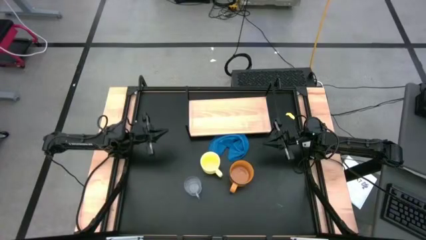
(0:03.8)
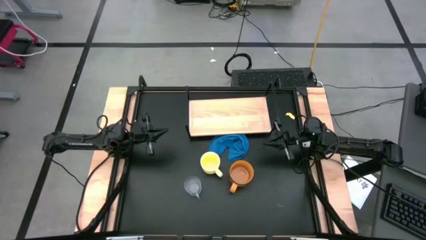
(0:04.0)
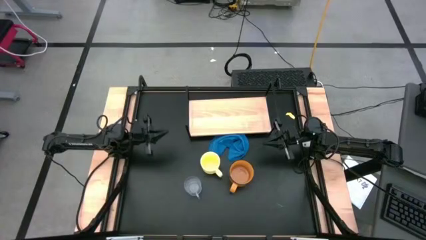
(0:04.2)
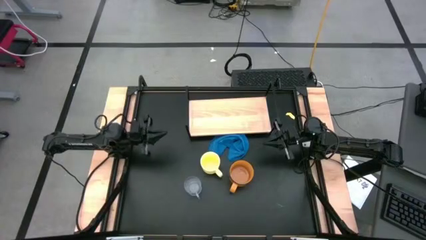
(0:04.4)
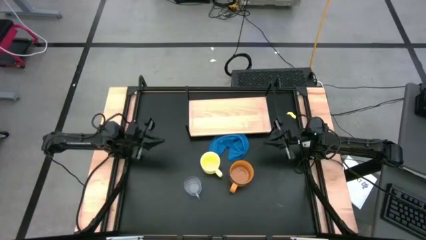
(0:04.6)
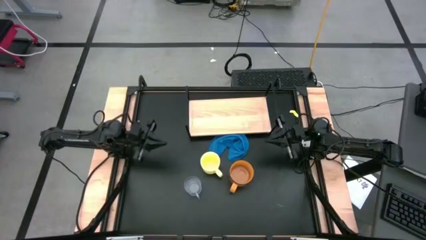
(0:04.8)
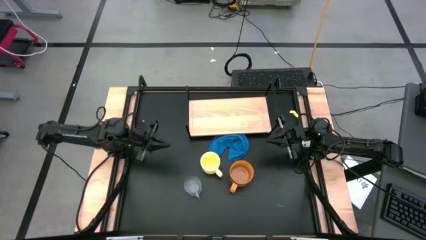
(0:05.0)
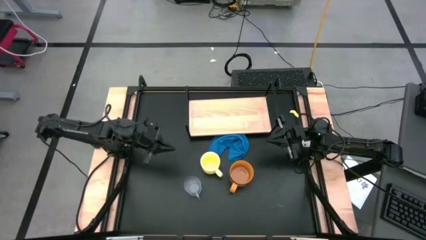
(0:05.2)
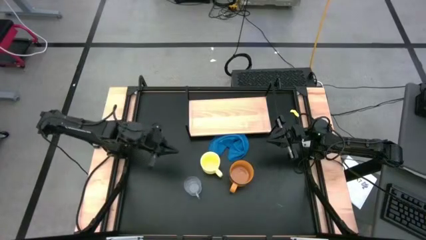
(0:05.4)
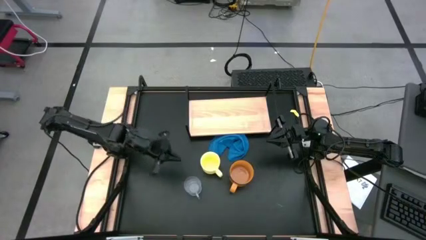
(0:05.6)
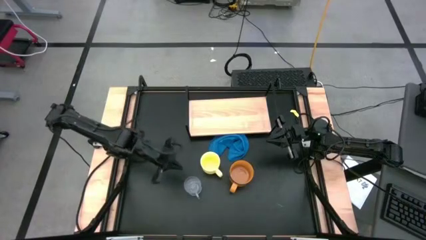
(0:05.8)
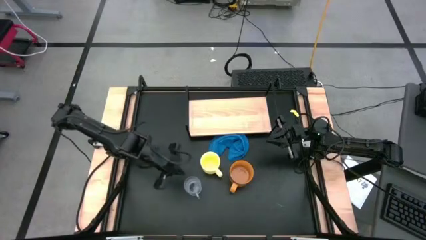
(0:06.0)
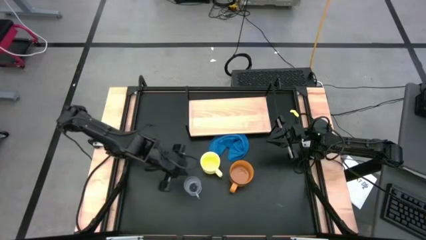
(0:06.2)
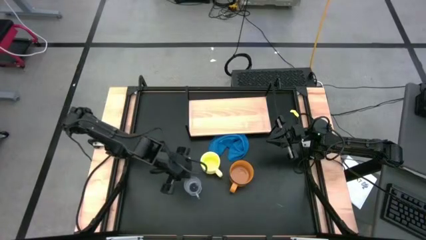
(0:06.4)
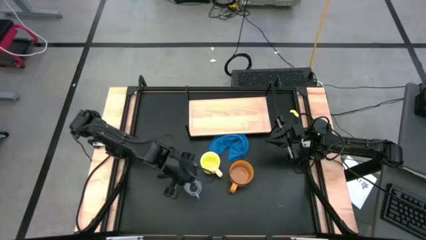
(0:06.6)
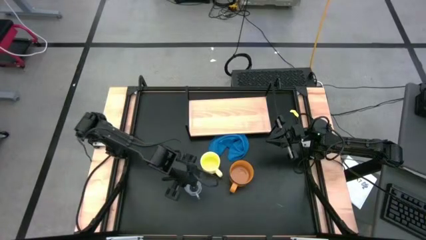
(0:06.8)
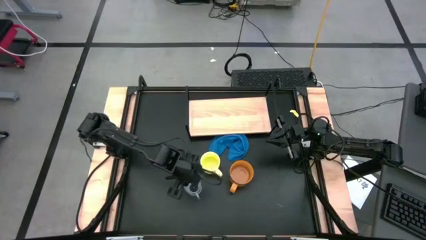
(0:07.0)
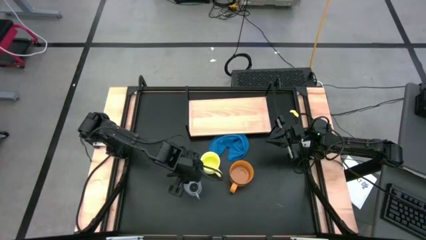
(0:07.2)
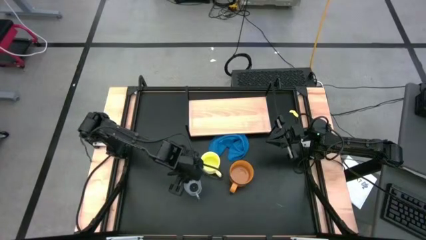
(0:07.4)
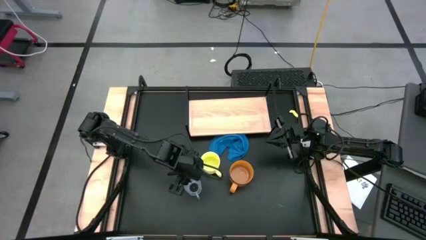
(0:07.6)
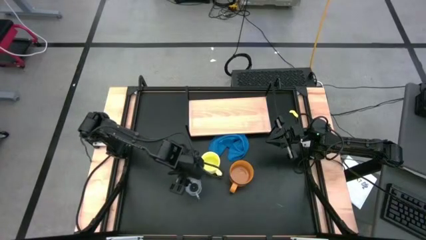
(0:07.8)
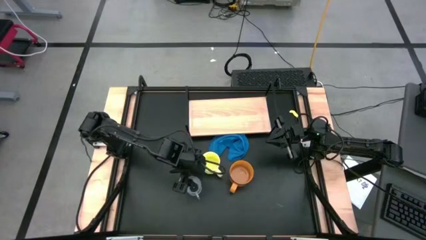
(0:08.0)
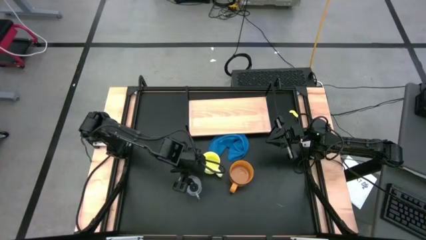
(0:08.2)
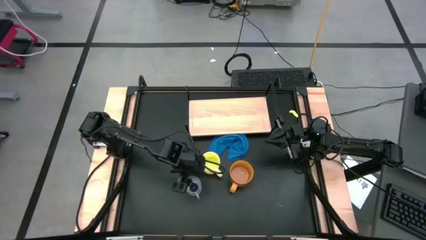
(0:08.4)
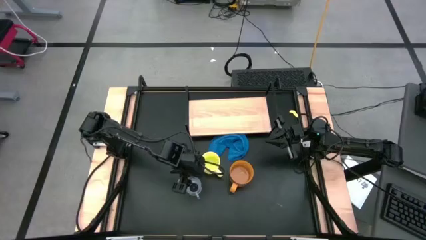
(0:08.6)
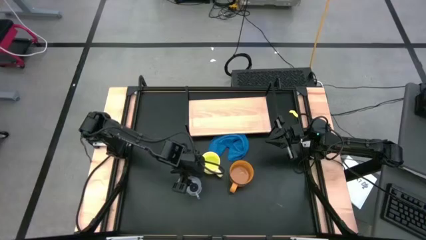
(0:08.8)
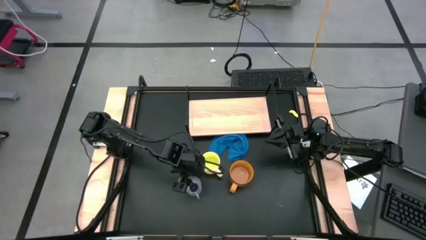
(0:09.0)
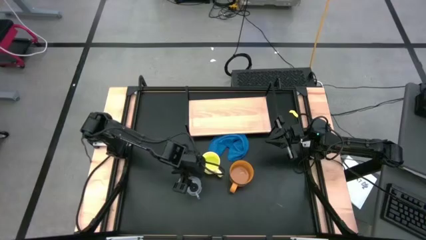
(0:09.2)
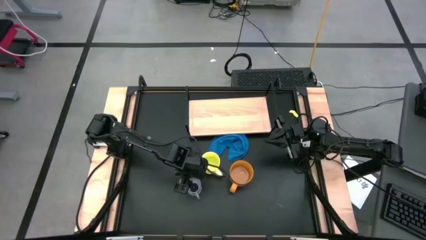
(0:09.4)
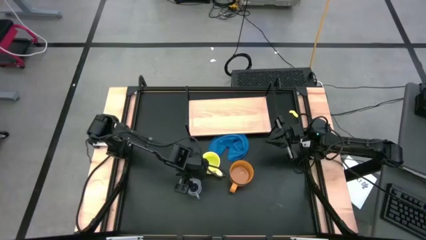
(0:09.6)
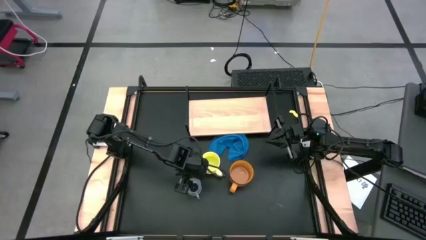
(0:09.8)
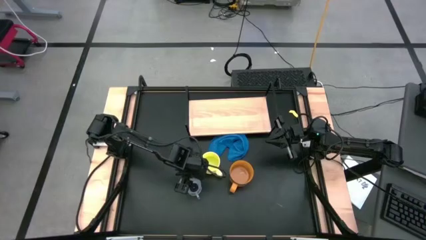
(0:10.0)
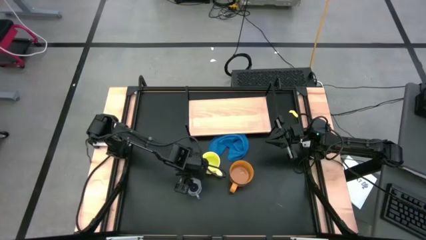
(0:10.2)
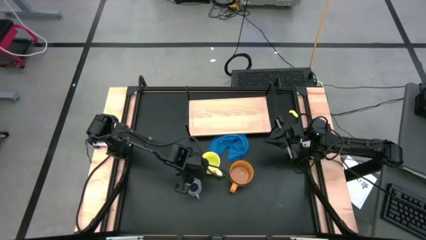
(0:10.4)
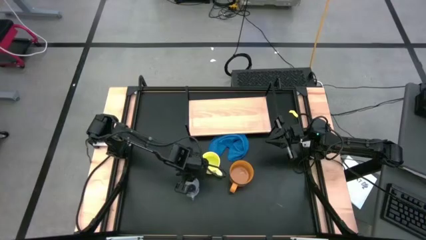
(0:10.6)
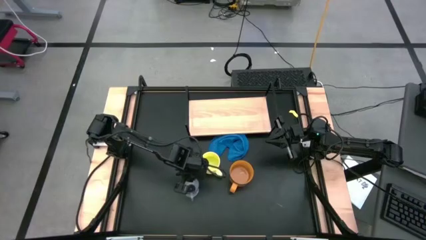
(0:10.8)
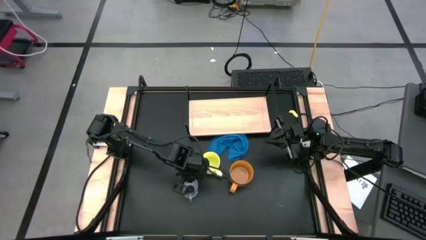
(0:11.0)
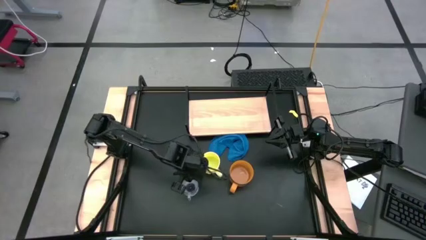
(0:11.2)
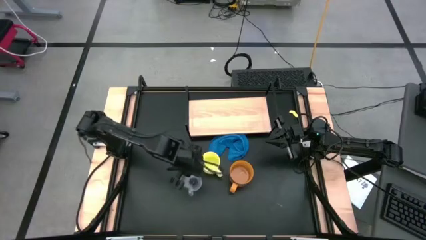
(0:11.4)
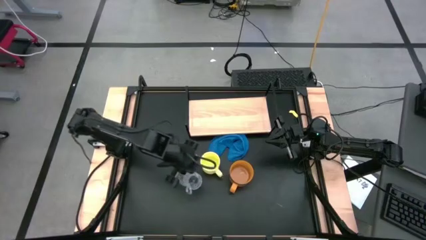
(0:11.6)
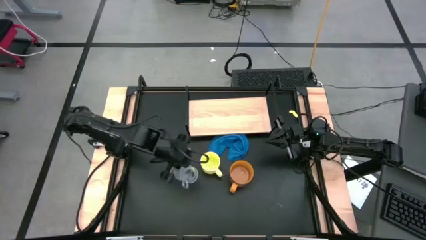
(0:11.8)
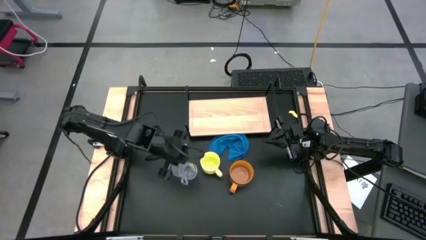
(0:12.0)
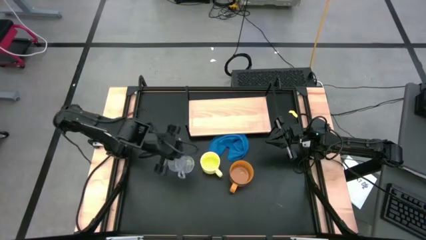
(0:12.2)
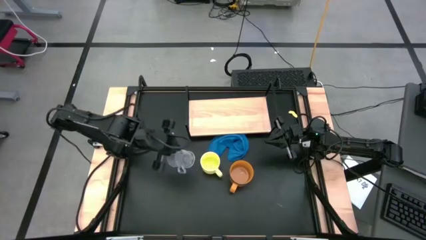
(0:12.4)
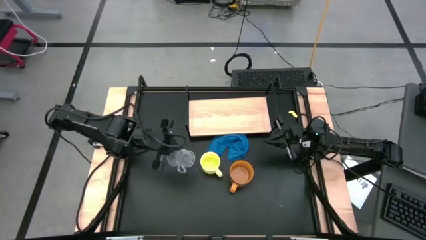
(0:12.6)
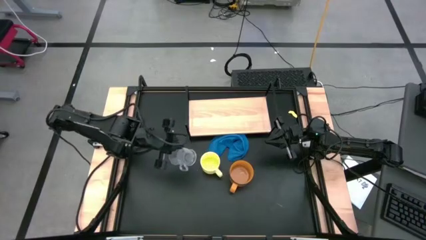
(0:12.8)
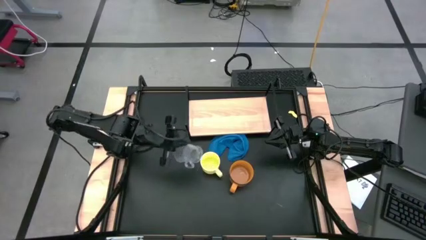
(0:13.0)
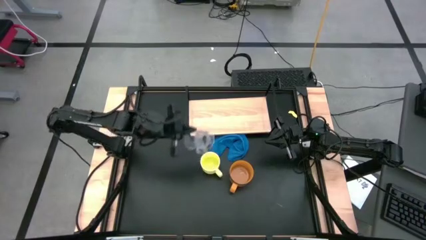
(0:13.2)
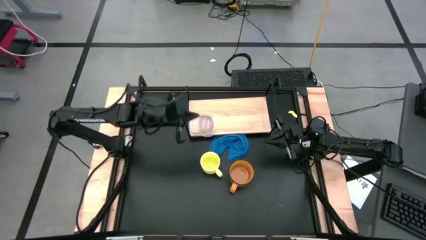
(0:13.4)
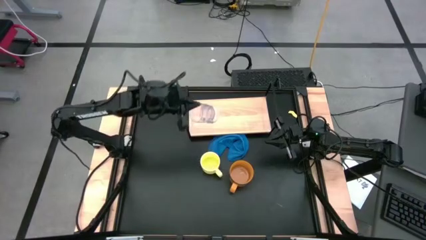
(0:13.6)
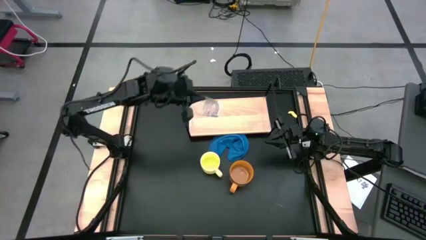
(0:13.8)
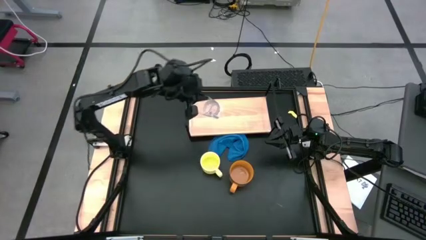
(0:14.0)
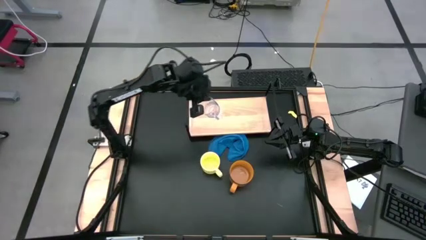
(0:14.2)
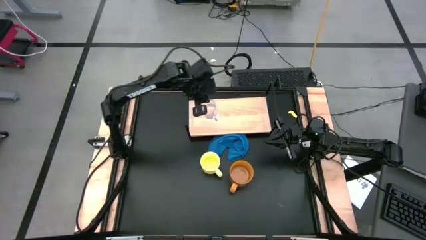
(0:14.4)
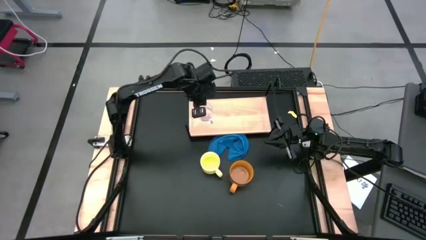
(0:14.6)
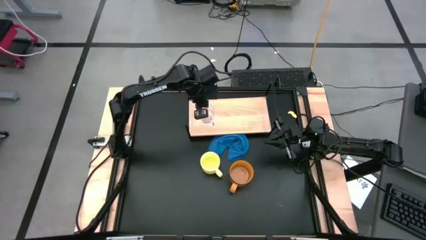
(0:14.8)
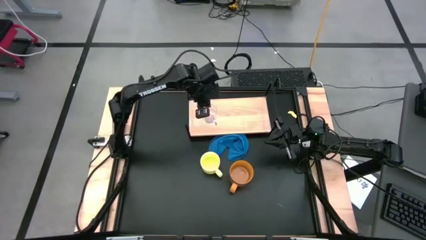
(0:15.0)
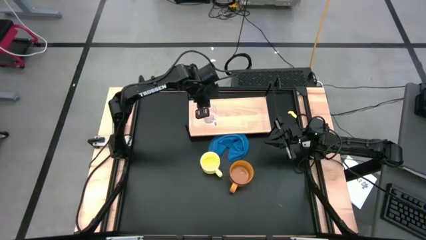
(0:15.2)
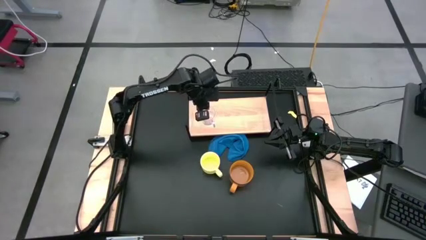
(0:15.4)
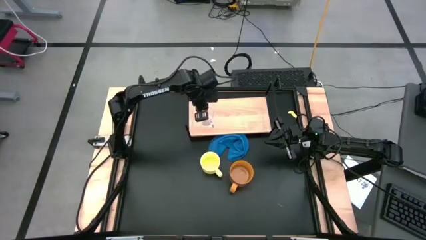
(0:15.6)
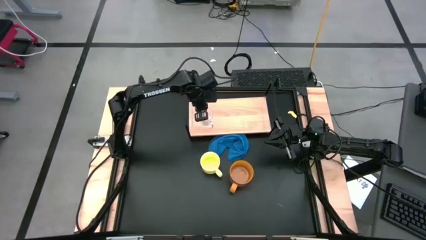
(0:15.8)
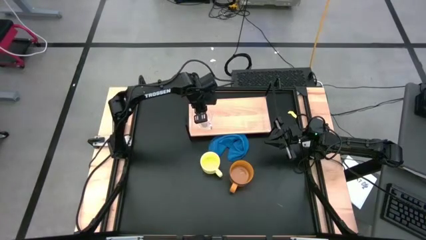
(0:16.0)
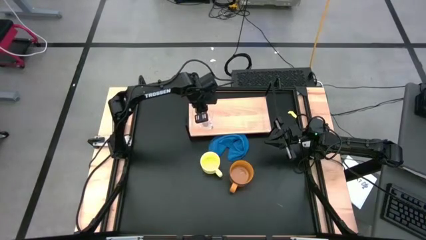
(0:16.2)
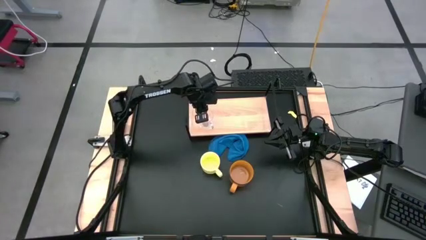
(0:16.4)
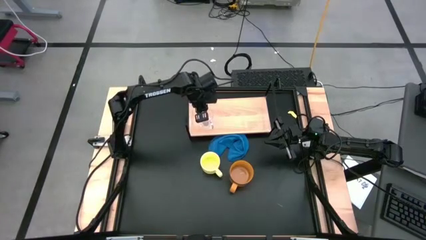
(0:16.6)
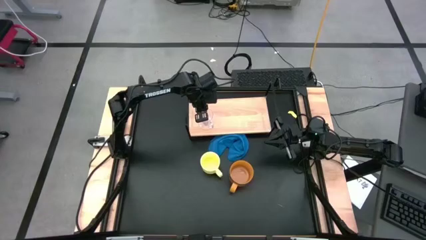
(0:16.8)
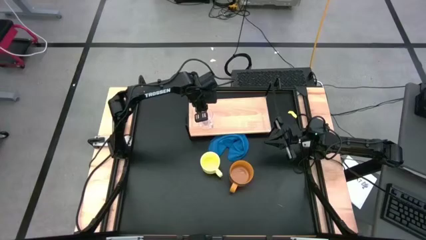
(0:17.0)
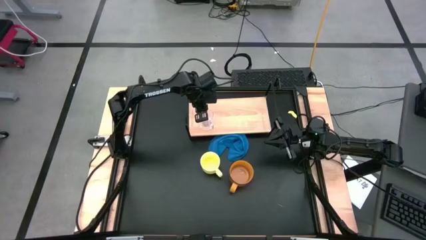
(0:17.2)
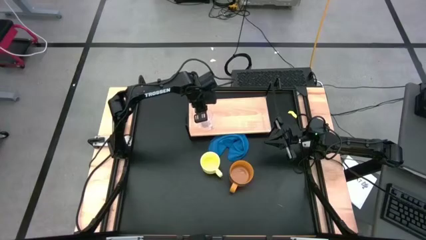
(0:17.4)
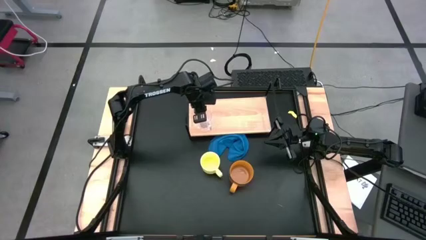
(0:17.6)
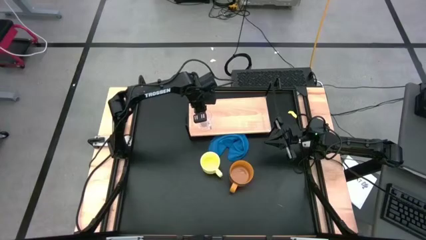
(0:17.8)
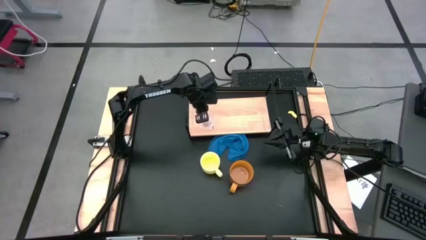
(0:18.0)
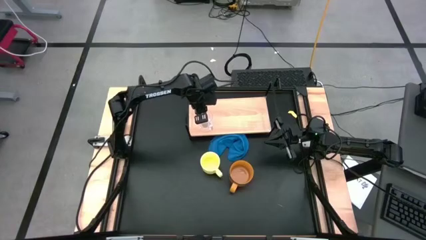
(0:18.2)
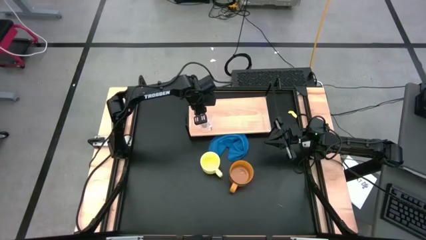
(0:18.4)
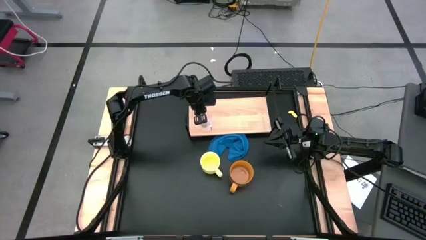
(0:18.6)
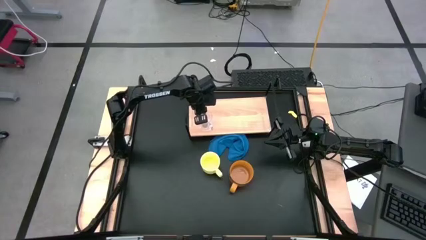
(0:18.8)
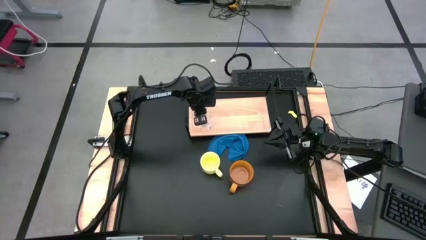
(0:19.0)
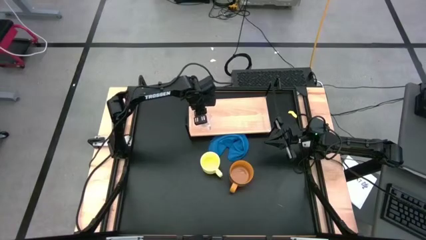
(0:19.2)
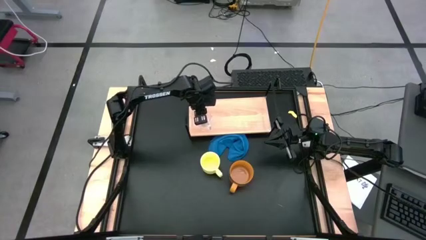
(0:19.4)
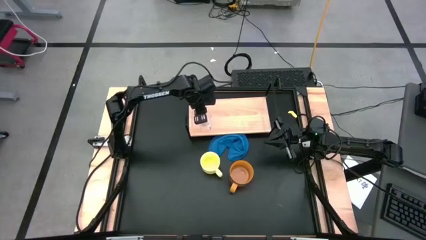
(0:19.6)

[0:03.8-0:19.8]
Task: Stack small to large cups/mugs on shelf
Put the transparent mug onto the shelf
